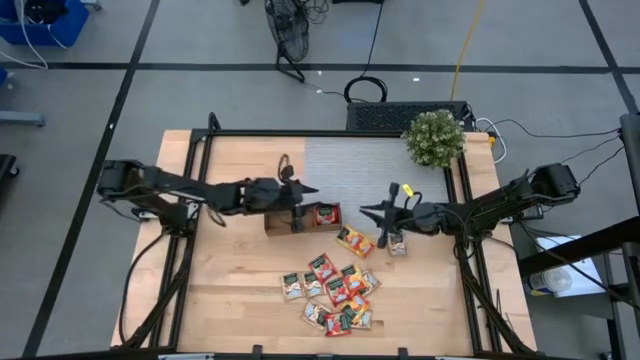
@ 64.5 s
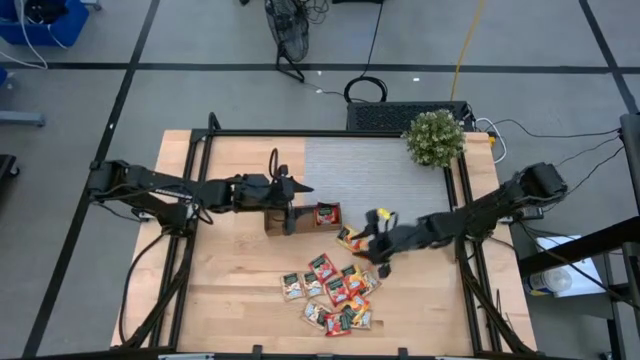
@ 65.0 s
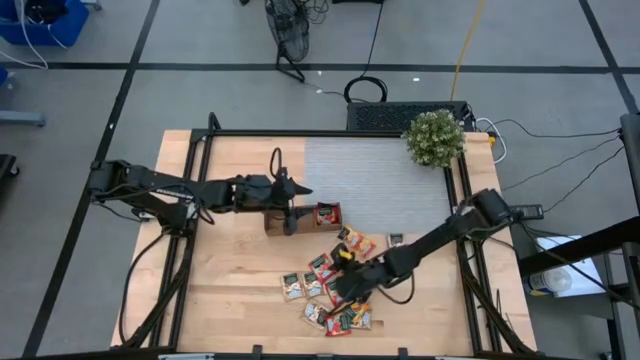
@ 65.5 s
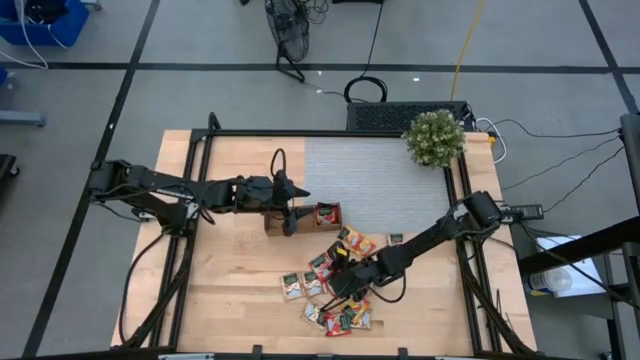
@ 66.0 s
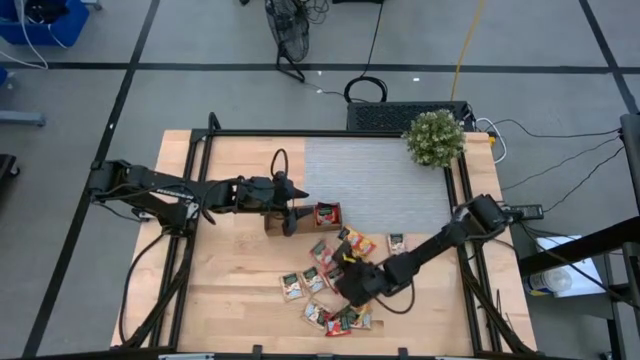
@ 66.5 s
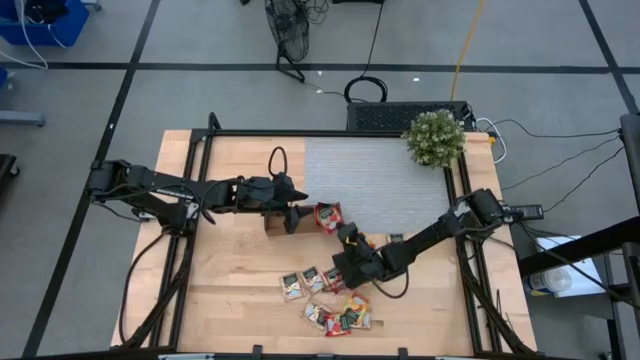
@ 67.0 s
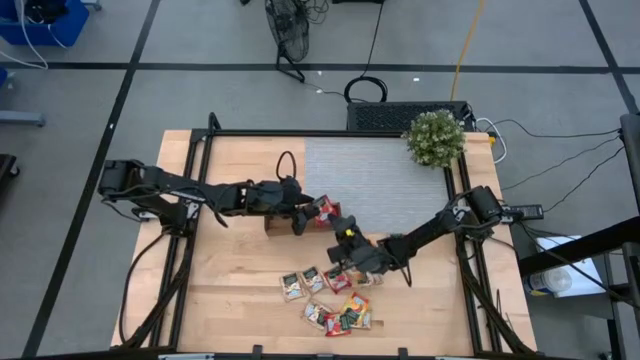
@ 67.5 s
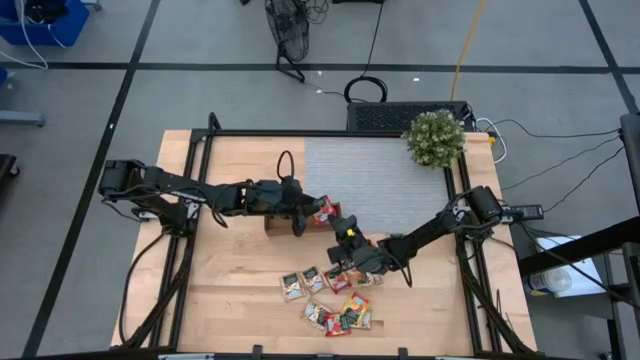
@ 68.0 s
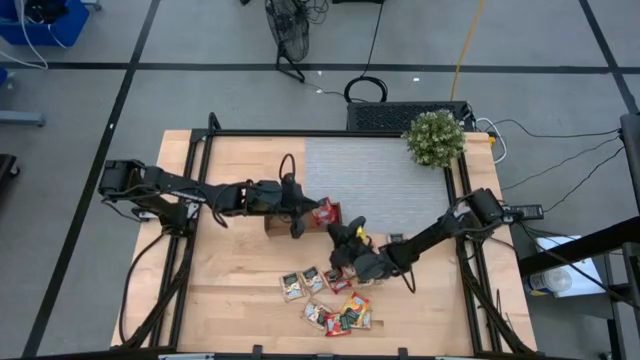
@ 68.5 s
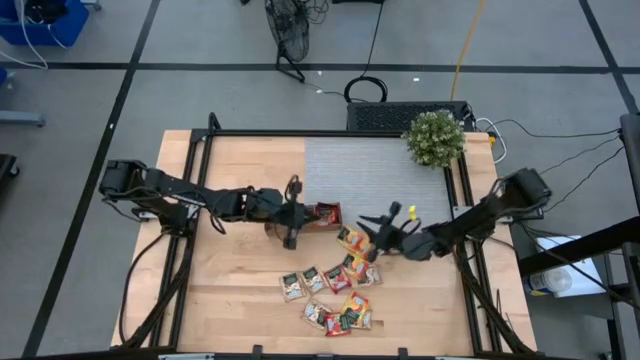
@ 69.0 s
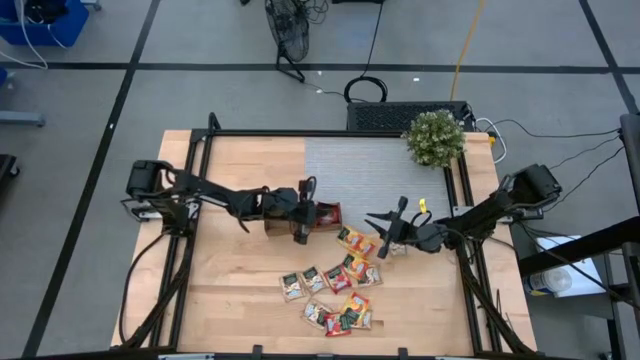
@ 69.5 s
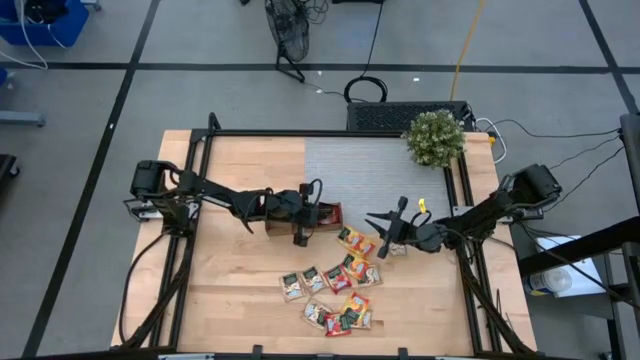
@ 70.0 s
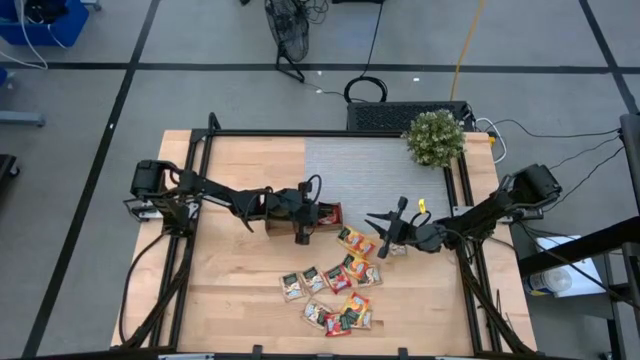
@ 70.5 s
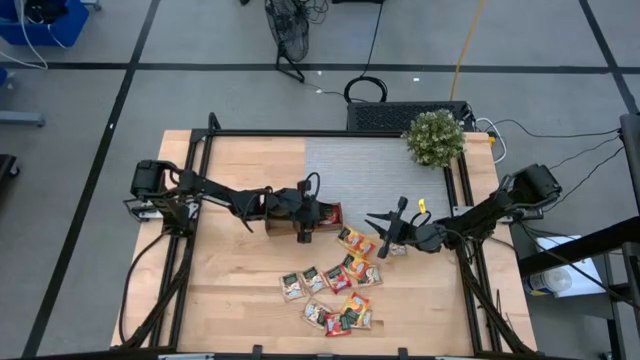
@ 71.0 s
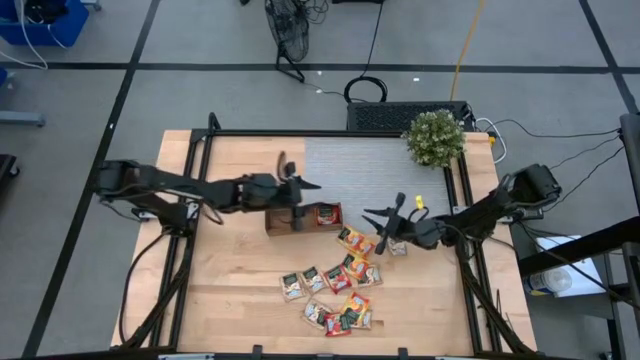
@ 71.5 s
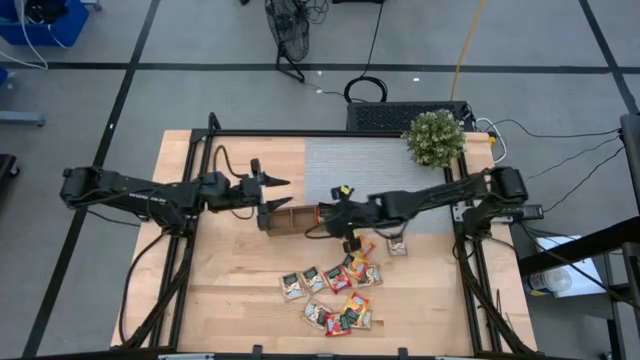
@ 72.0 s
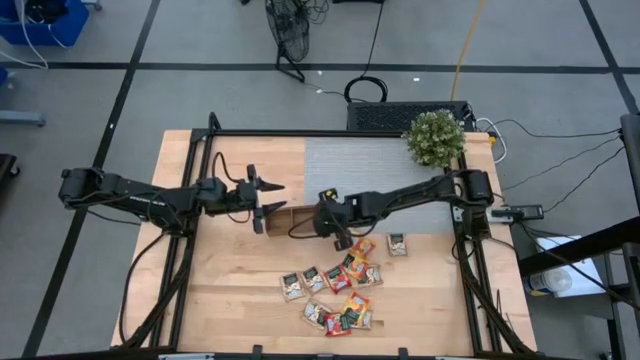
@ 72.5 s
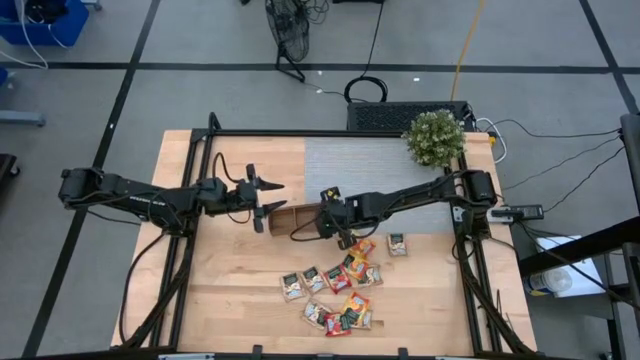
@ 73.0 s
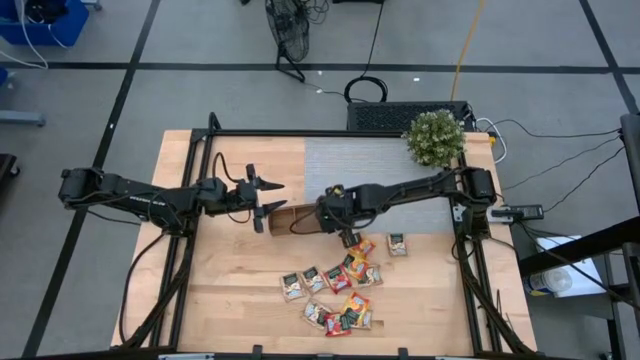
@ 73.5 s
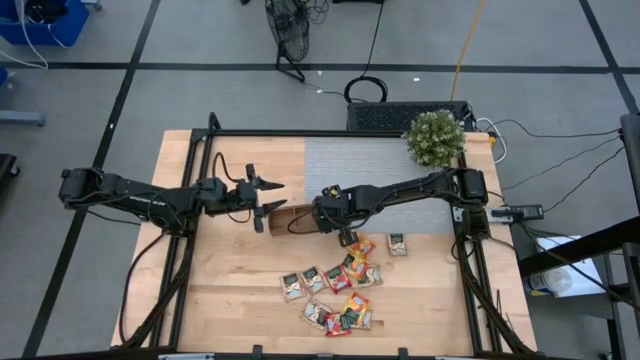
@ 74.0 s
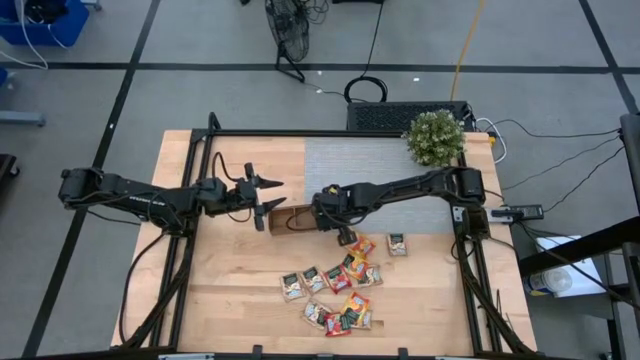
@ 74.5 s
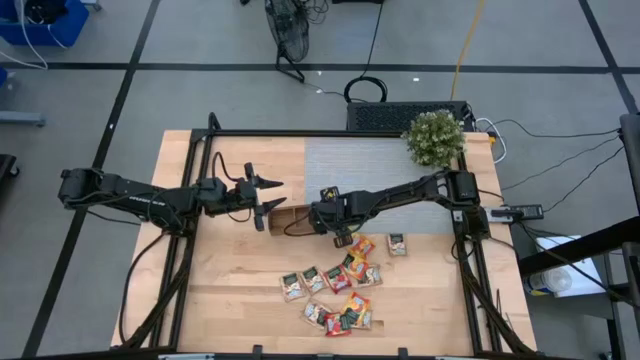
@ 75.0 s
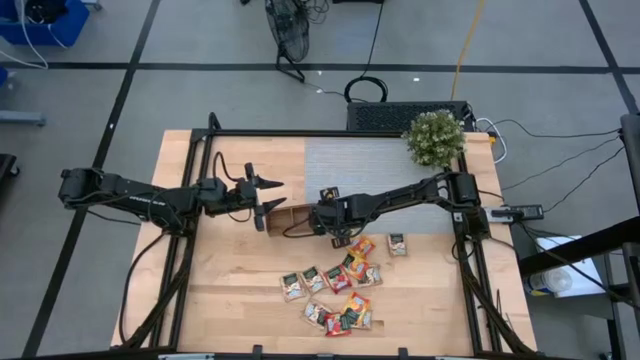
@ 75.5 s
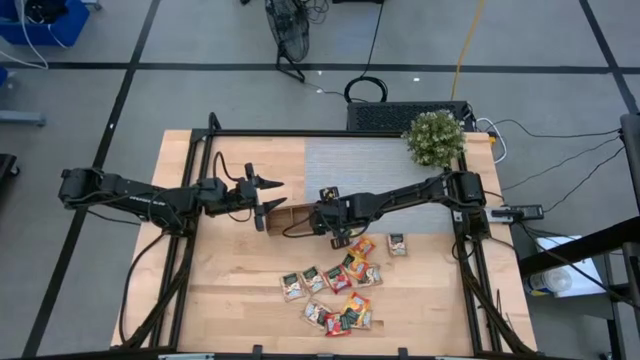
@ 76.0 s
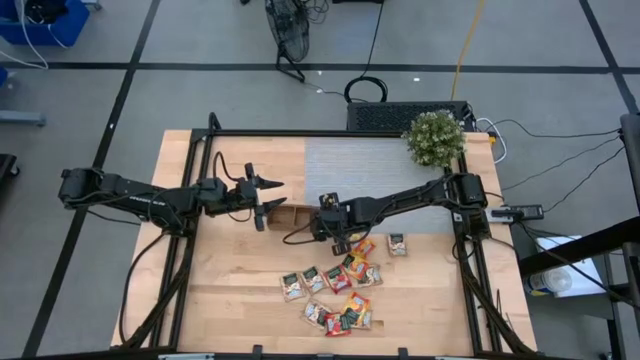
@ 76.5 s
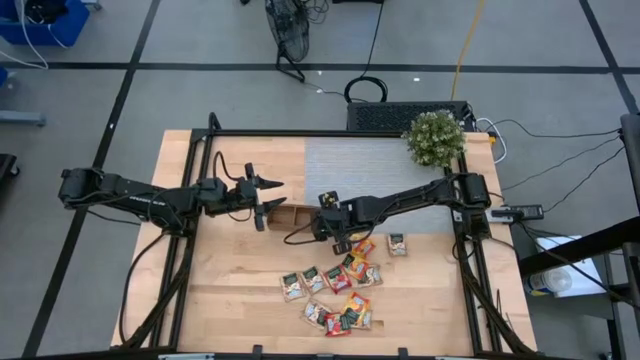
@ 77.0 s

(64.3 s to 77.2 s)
Task: Pick & Place Tea
Put the red tea bag into the right section of the wooden organizer

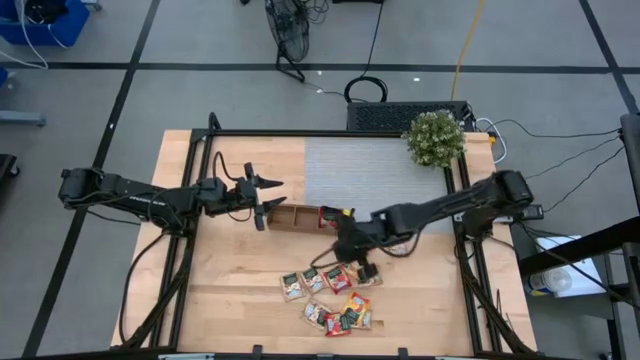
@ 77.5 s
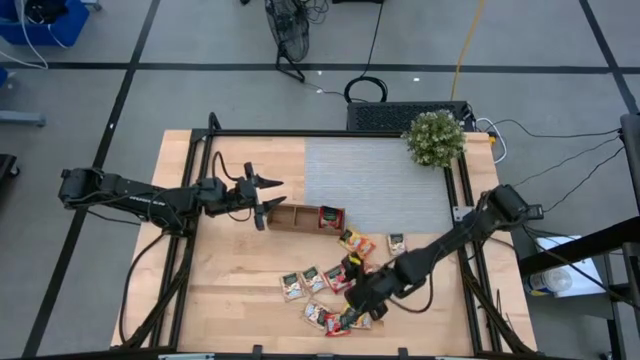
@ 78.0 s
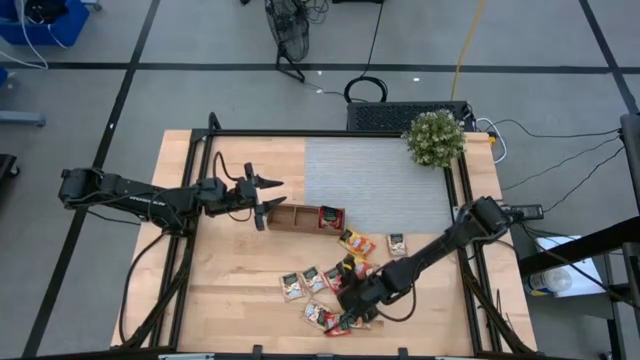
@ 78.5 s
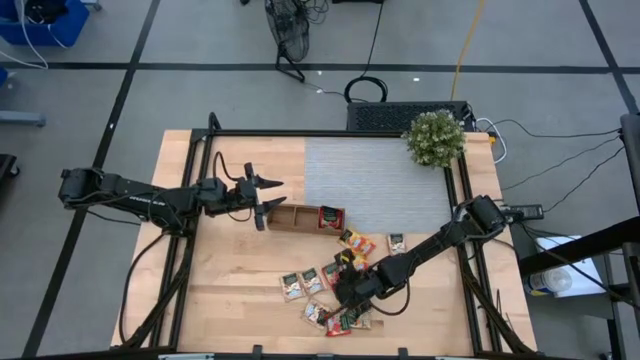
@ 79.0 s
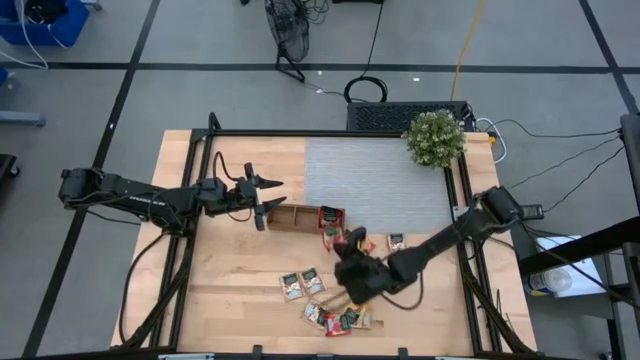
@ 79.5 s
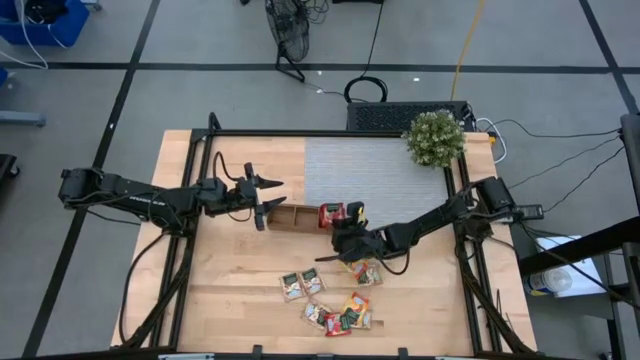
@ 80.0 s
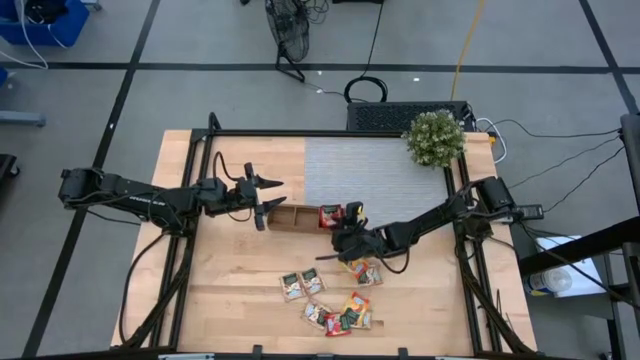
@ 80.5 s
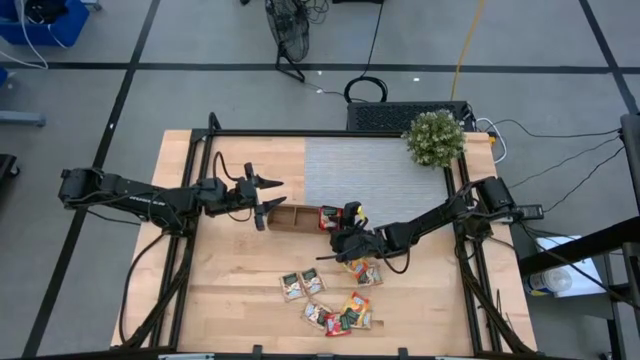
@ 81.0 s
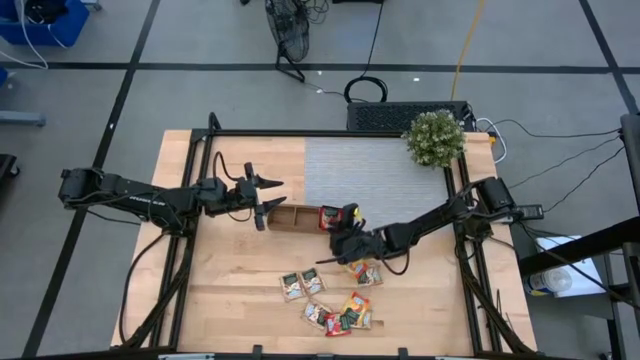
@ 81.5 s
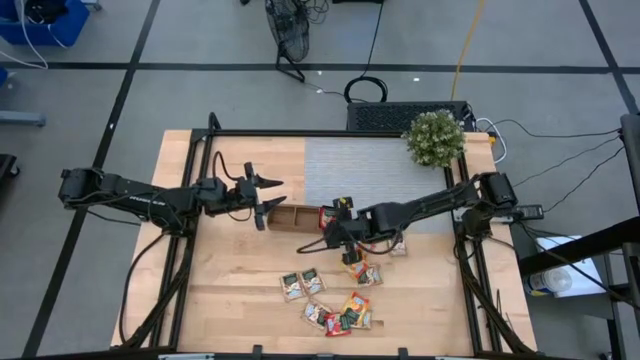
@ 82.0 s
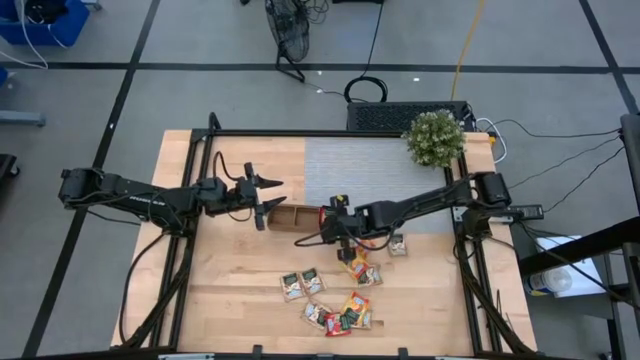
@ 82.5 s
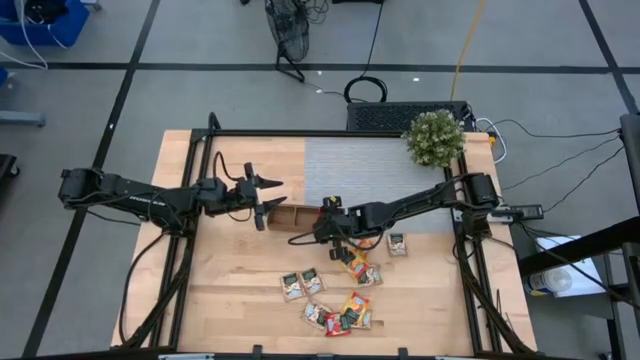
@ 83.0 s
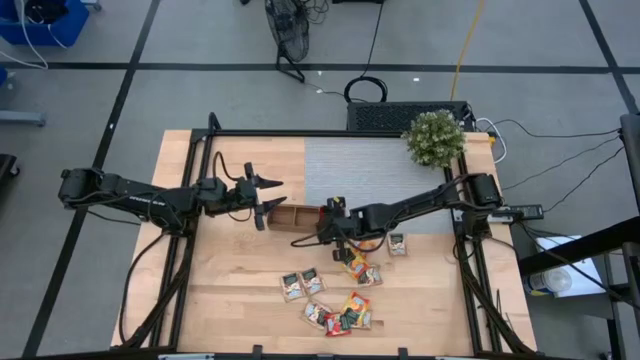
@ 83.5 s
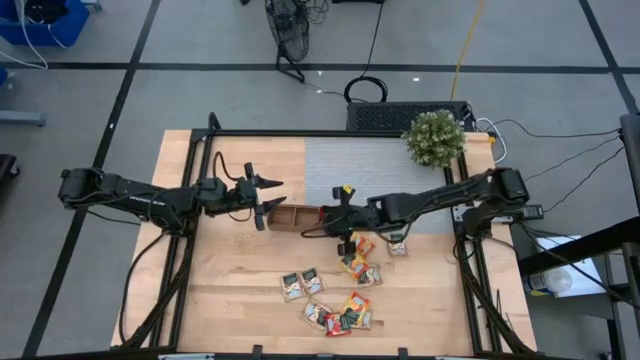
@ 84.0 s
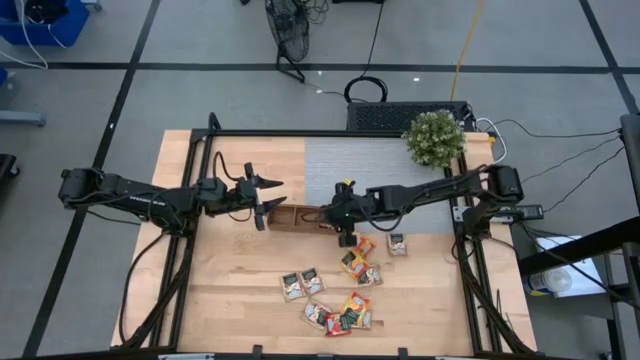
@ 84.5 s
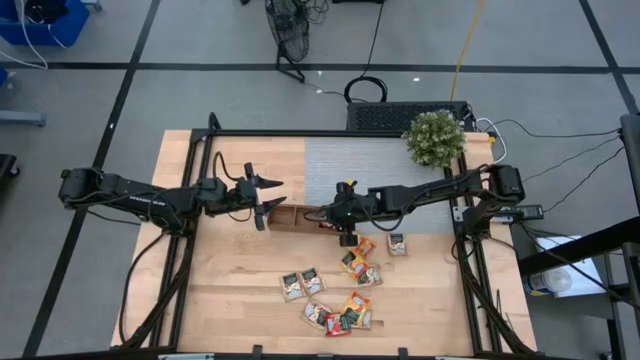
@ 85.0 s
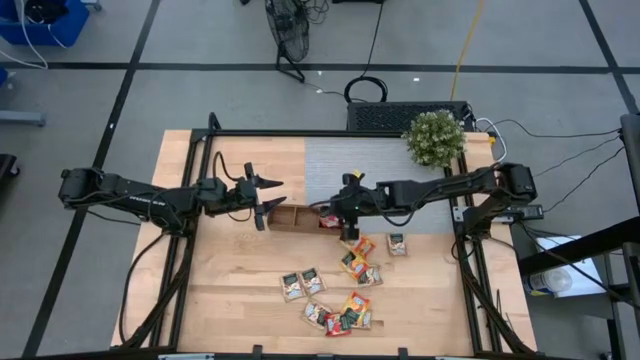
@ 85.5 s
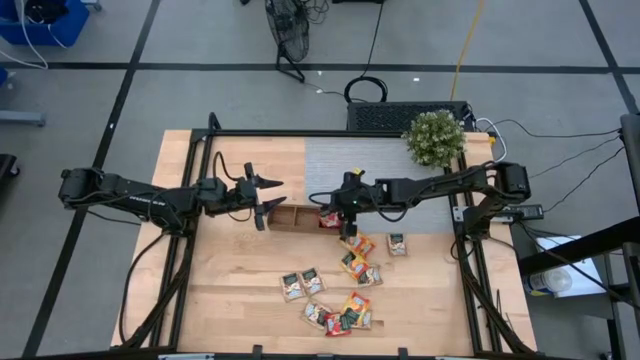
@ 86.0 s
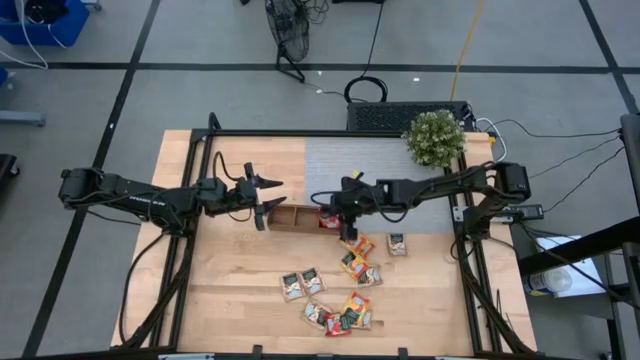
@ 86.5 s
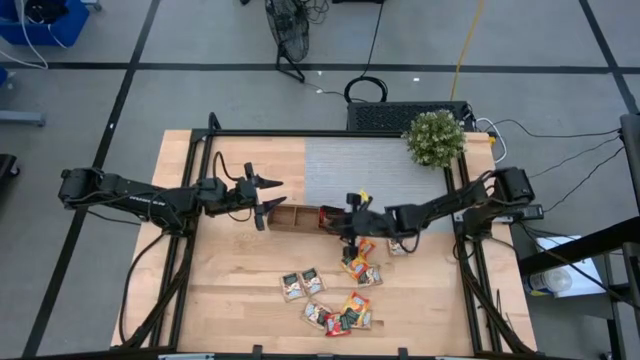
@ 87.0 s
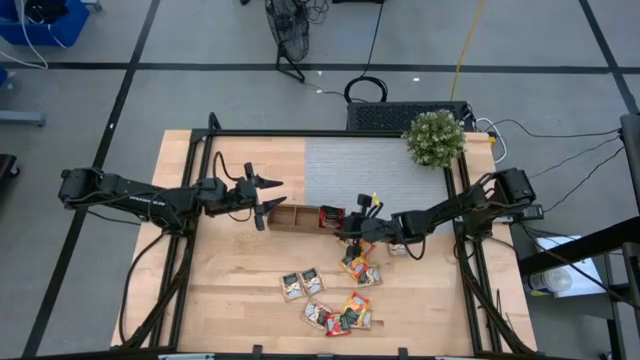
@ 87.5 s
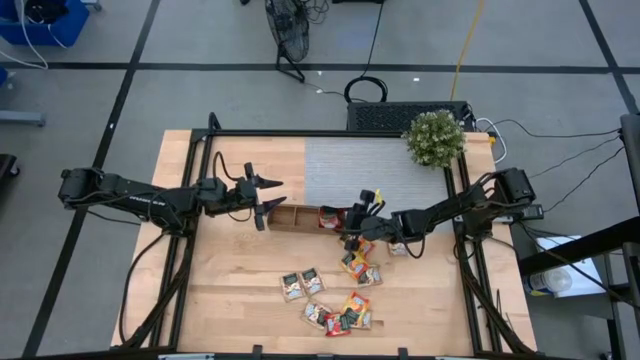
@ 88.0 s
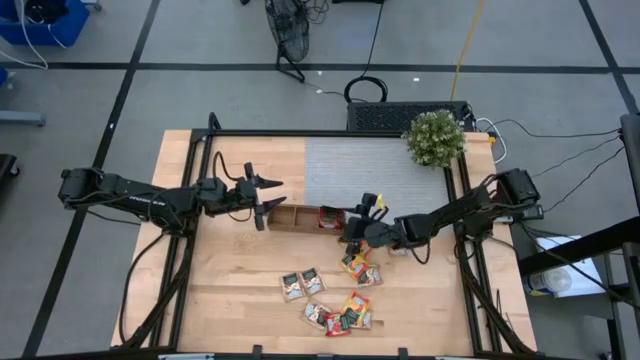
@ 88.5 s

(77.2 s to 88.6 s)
Put the red tea bag into the right section of the wooden organizer
